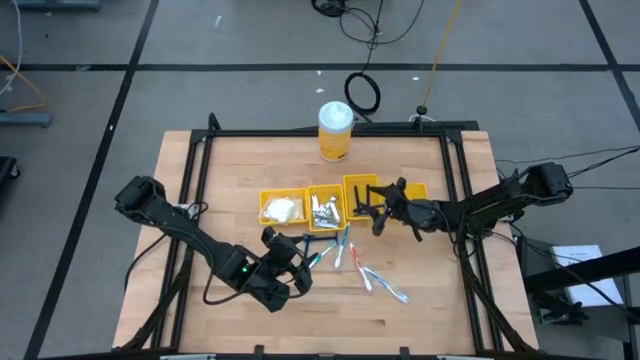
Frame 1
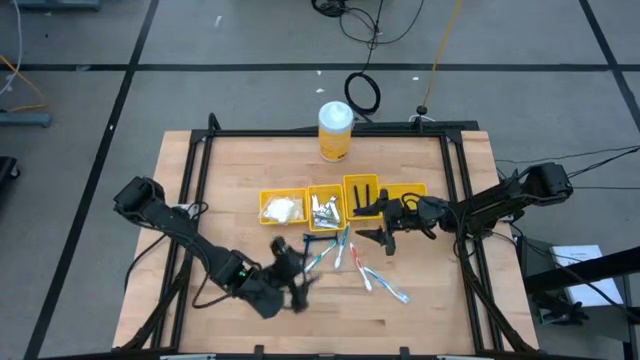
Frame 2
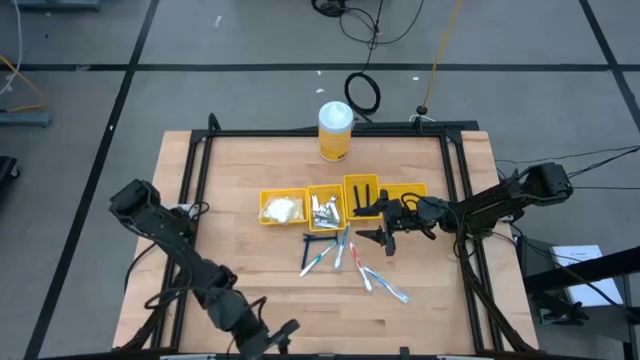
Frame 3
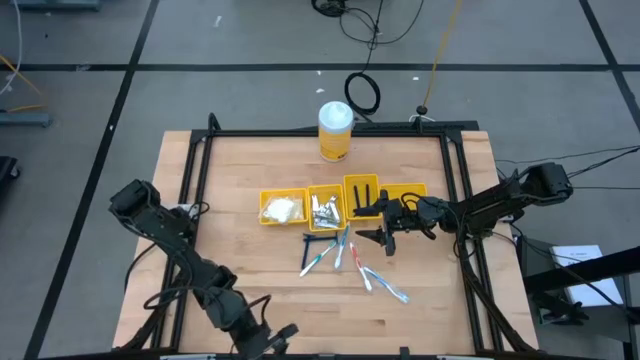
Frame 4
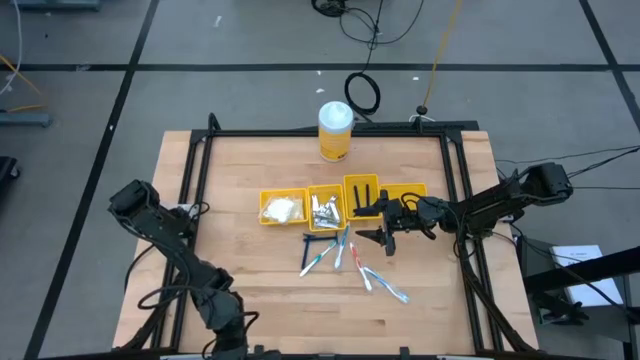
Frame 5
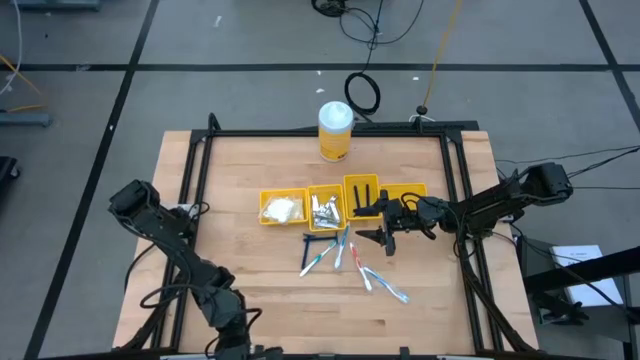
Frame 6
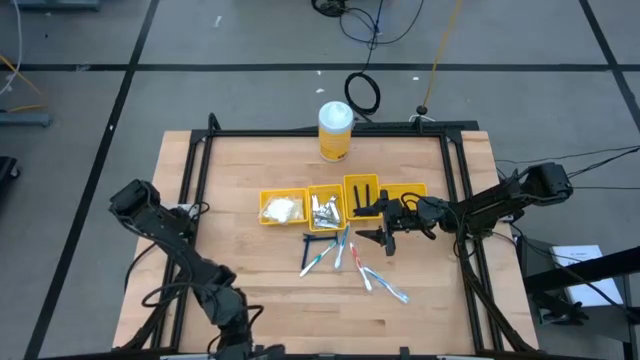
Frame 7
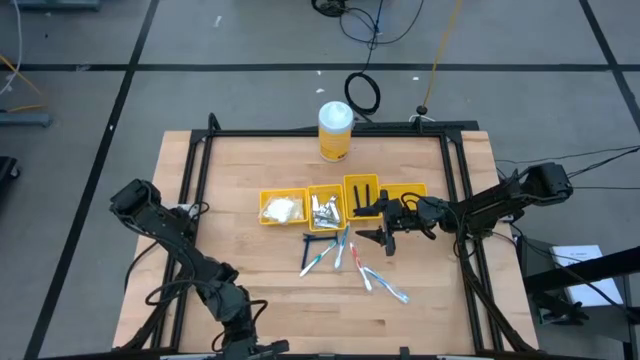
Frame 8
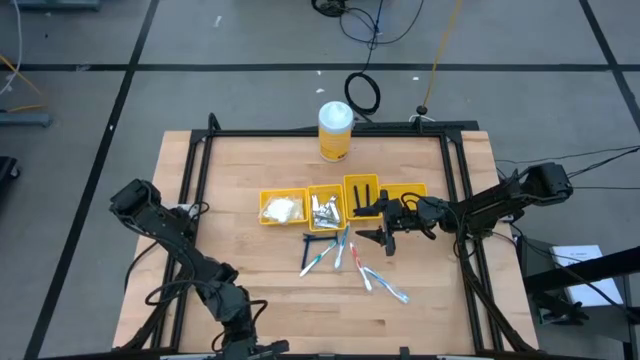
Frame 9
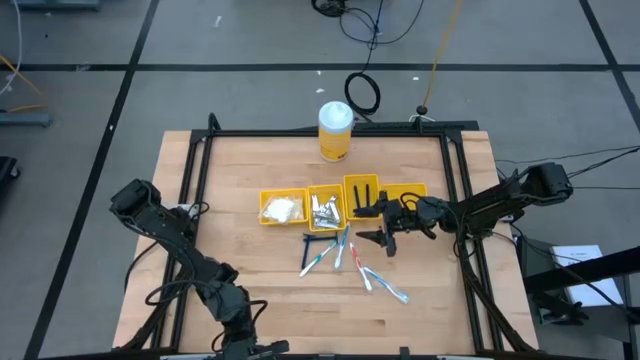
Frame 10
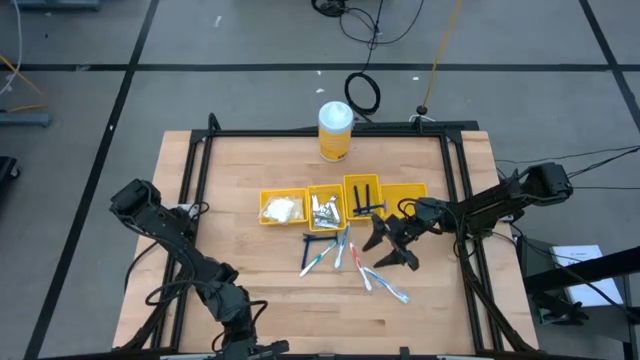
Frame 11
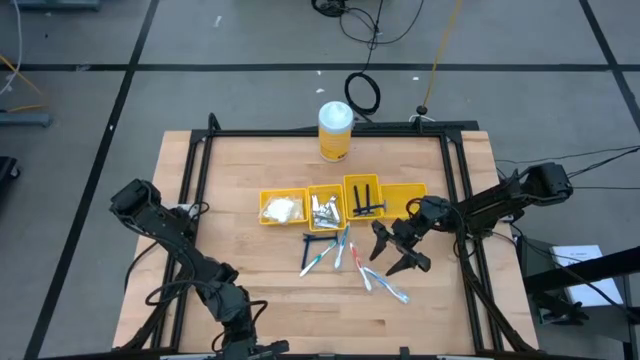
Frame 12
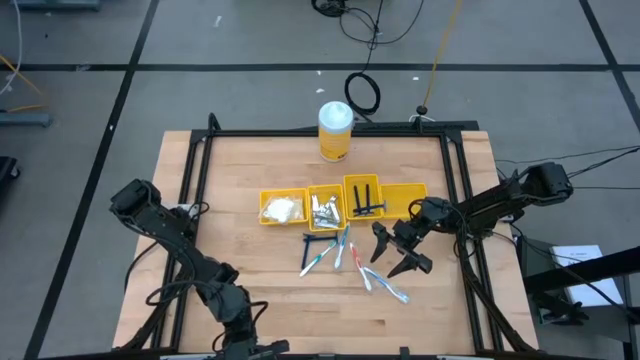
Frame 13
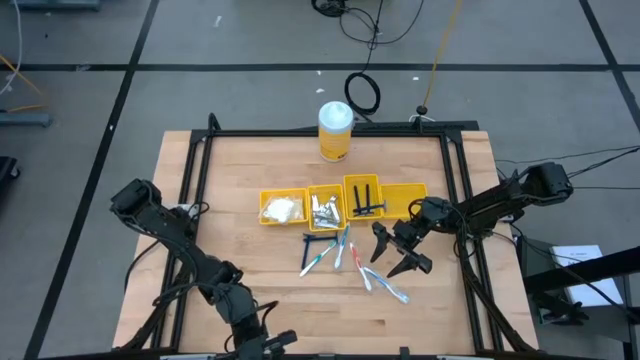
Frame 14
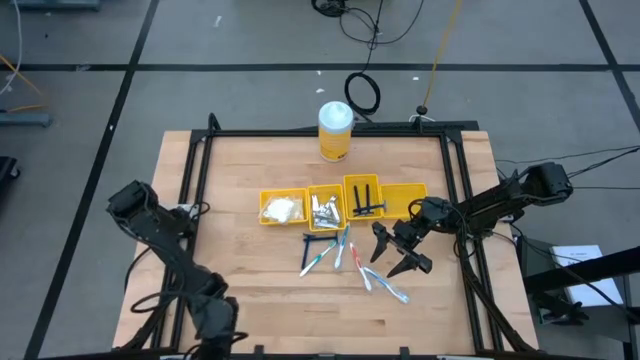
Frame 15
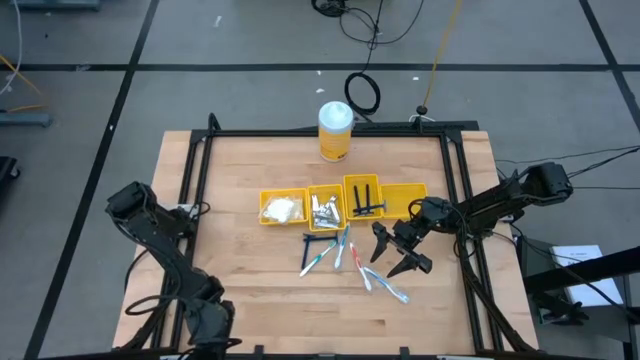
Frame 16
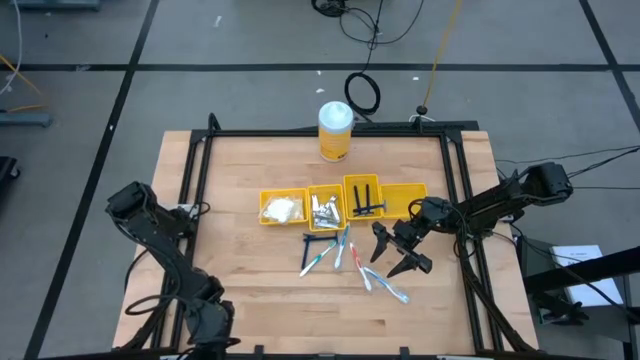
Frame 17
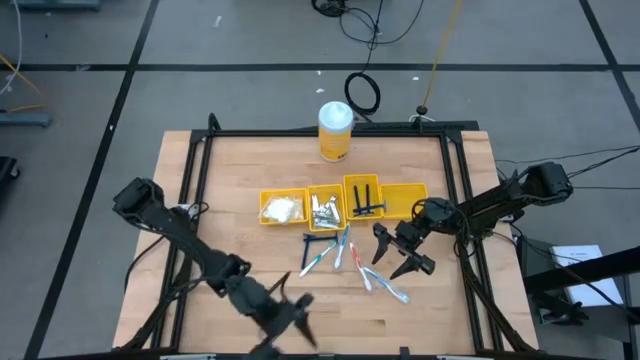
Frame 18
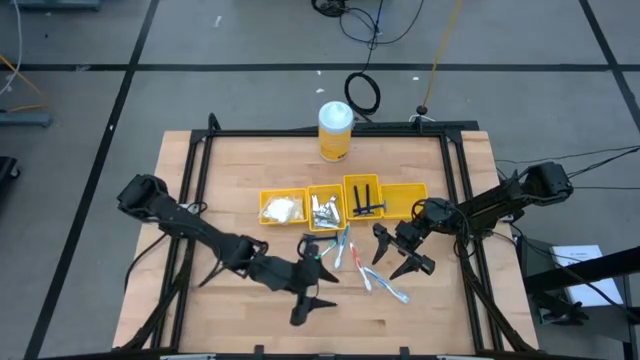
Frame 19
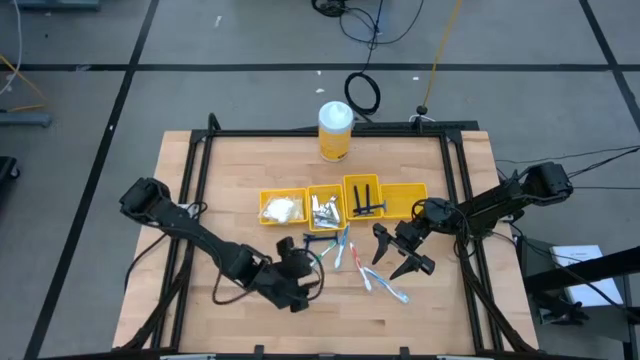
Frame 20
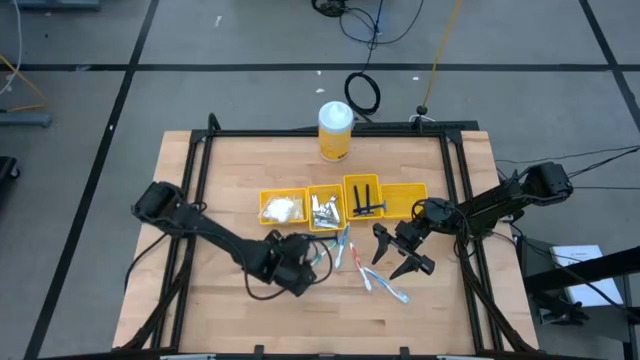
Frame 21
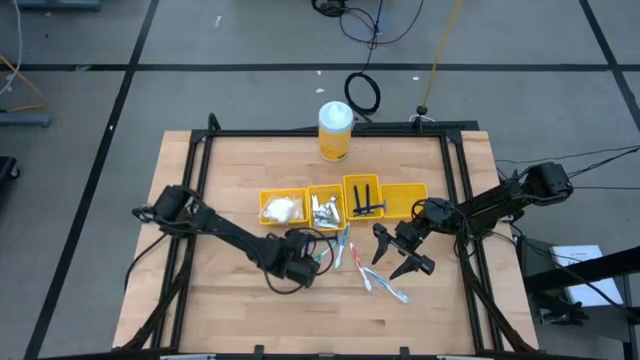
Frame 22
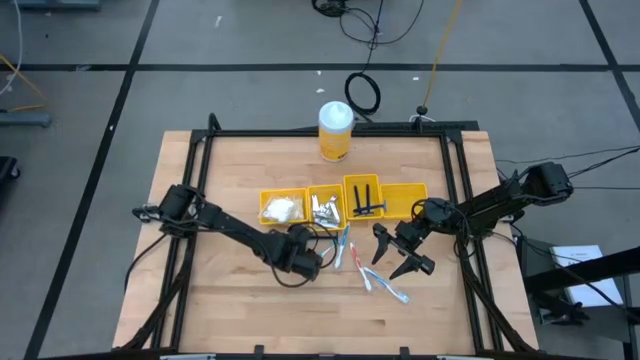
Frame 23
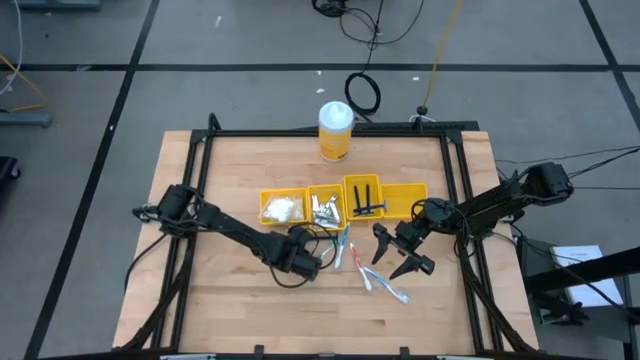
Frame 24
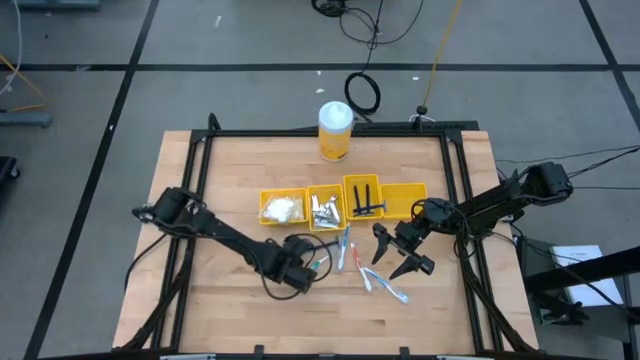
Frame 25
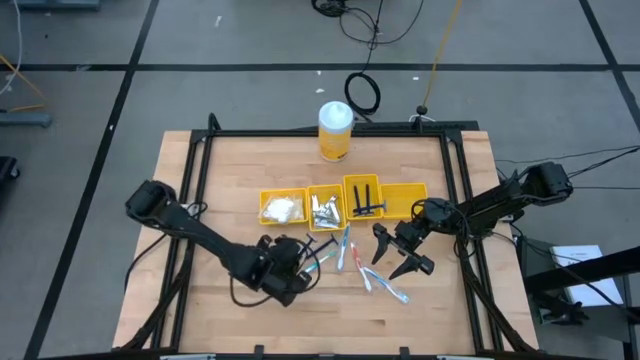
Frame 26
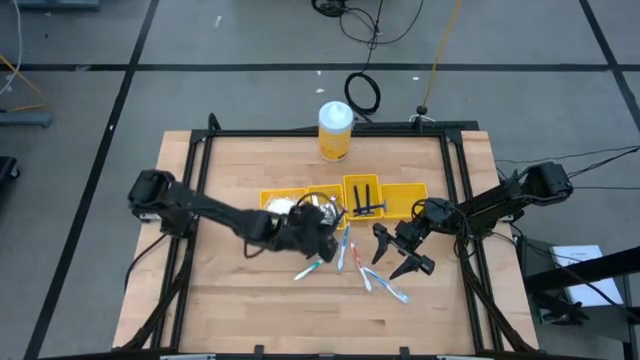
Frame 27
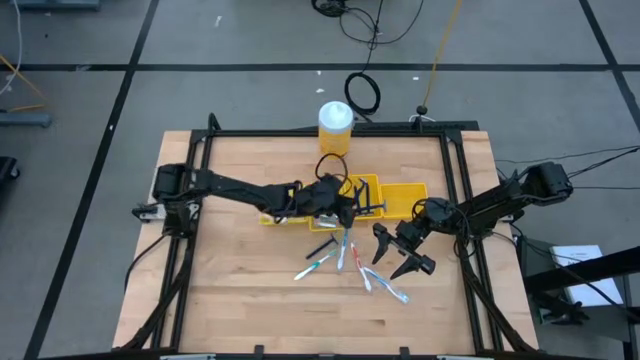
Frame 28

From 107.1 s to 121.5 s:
Task: Pick & Place Travel size toiletries
Put the left blue razor into the middle right yellow bin

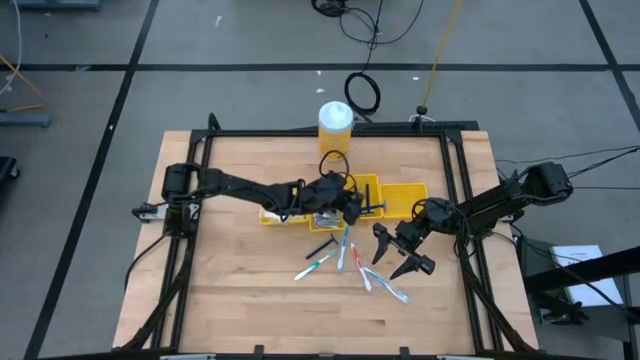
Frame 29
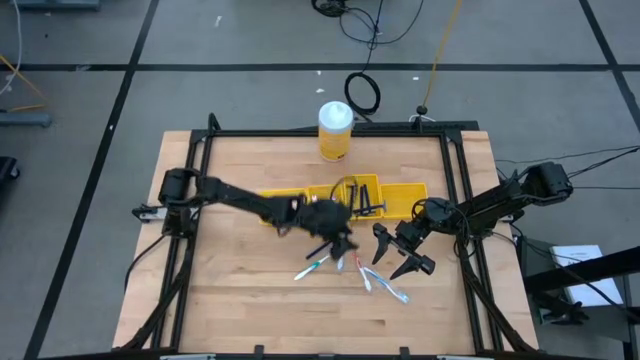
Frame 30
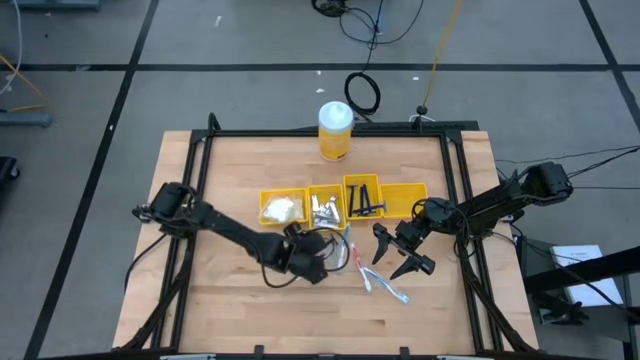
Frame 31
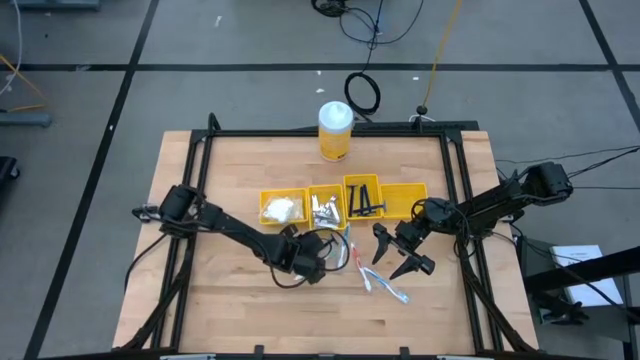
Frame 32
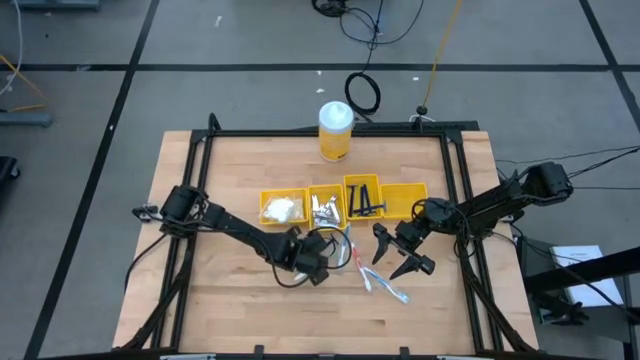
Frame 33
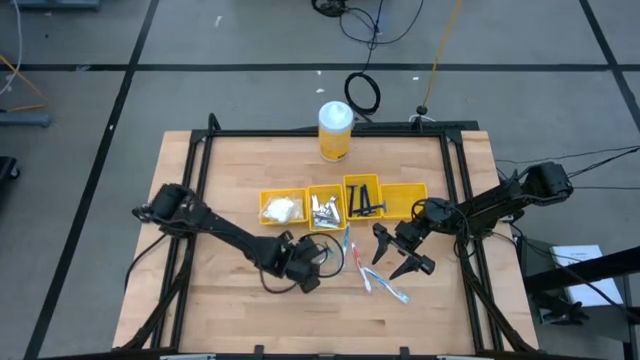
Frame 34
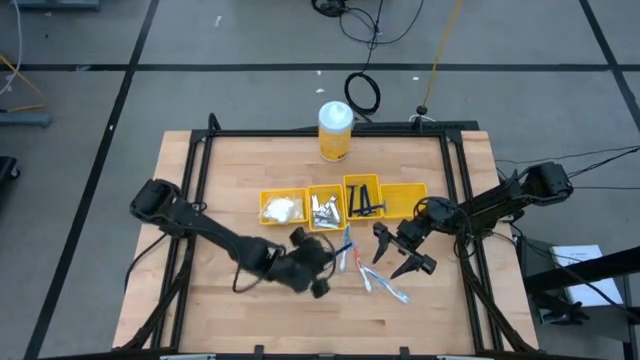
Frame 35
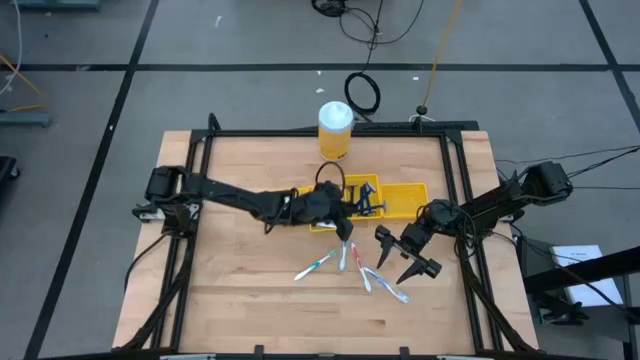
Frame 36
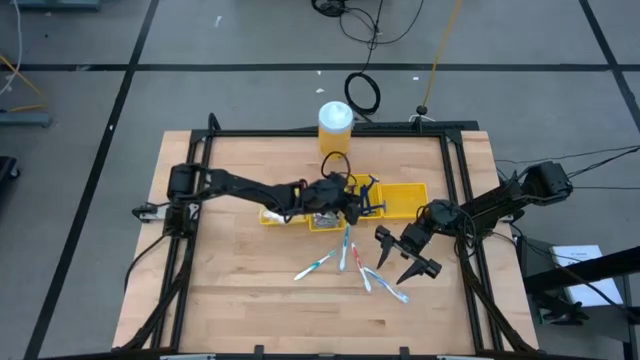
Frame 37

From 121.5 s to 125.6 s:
Put the blue razor into the middle right yellow bin

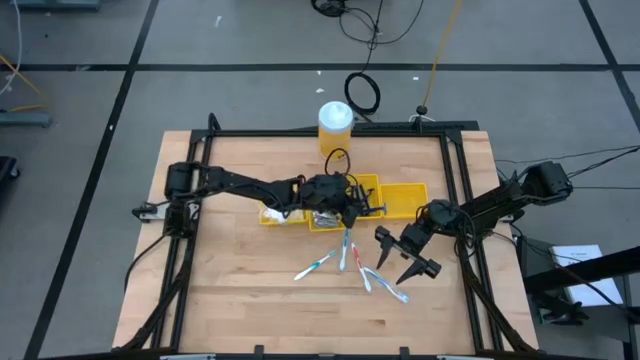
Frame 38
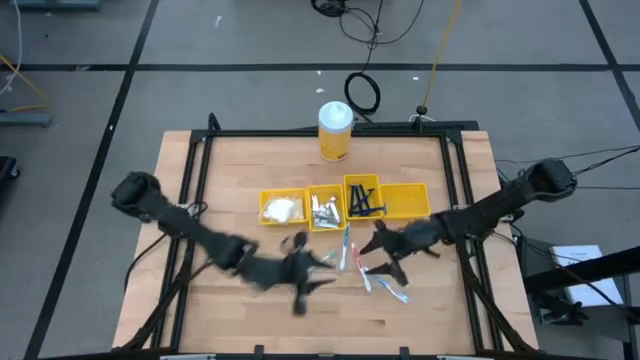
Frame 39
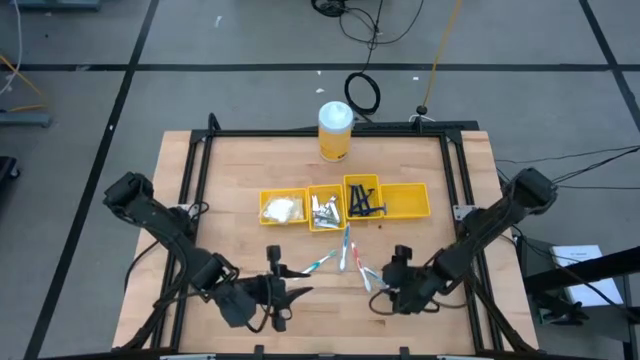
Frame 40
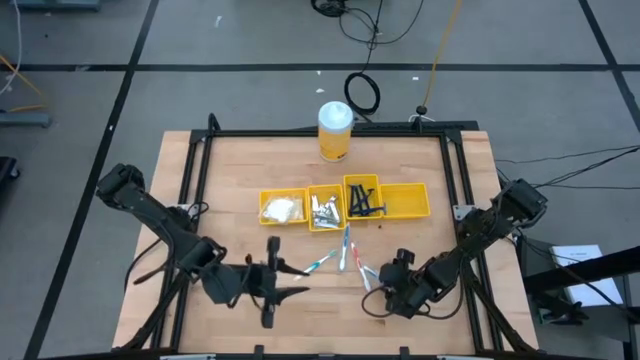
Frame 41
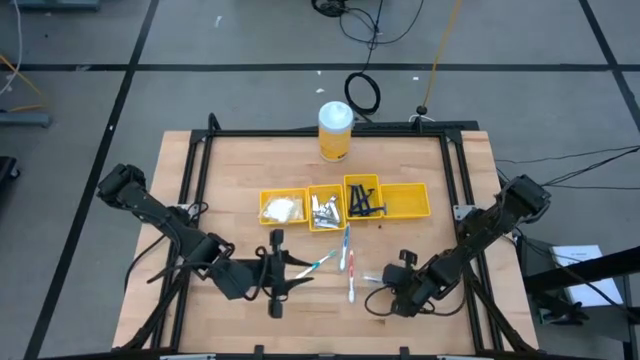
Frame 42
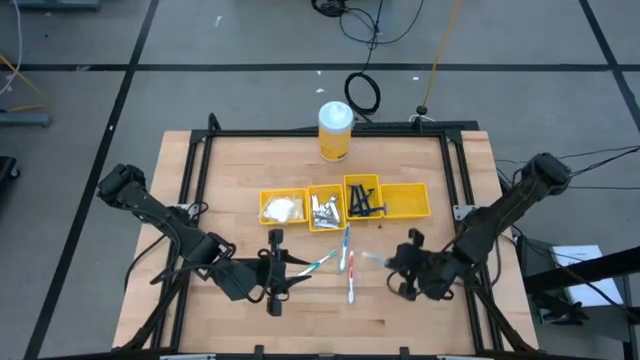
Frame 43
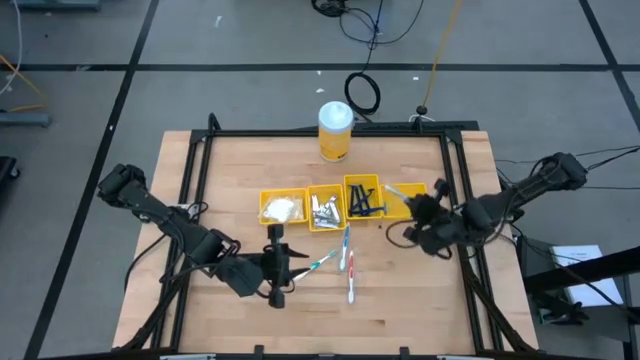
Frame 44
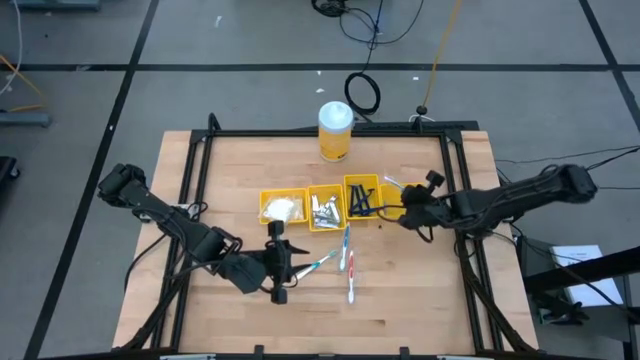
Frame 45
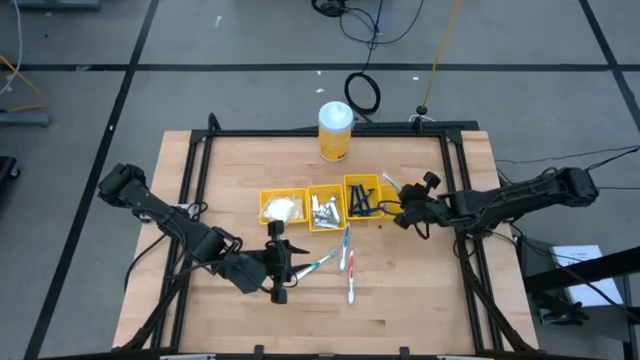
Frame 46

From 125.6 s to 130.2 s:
Put the blue toothbrush into the right yellow bin
